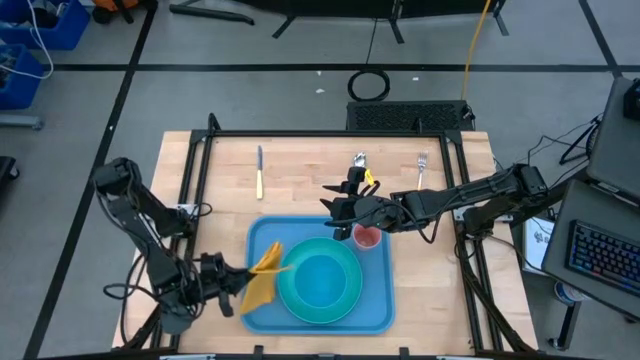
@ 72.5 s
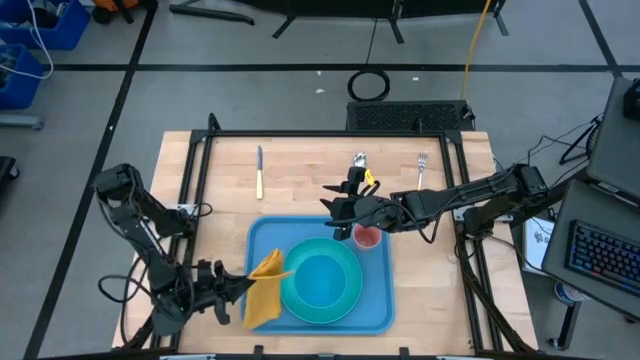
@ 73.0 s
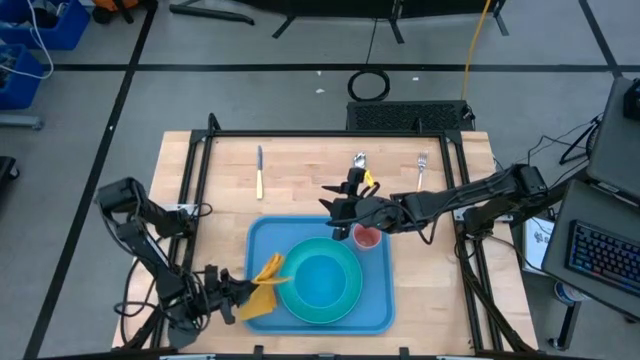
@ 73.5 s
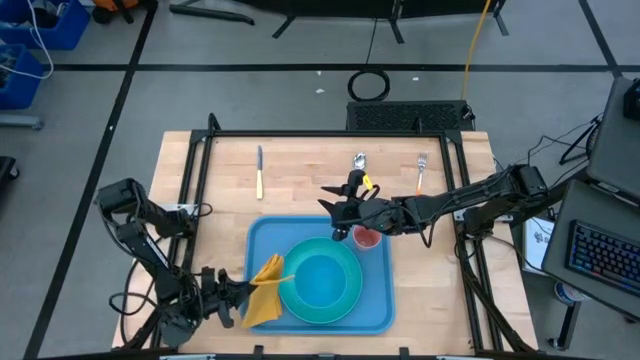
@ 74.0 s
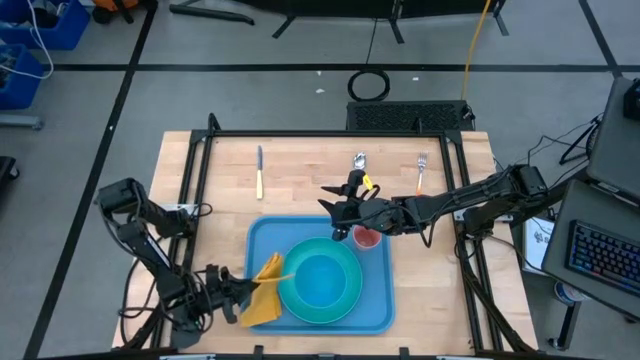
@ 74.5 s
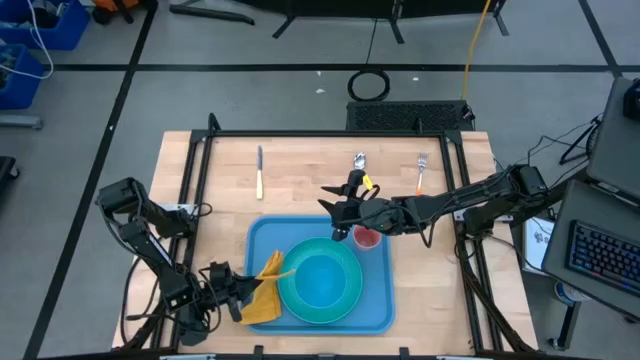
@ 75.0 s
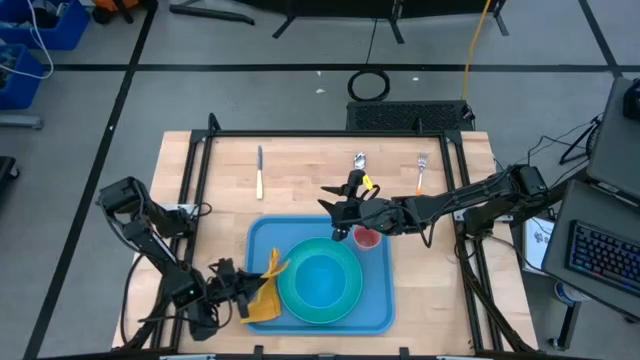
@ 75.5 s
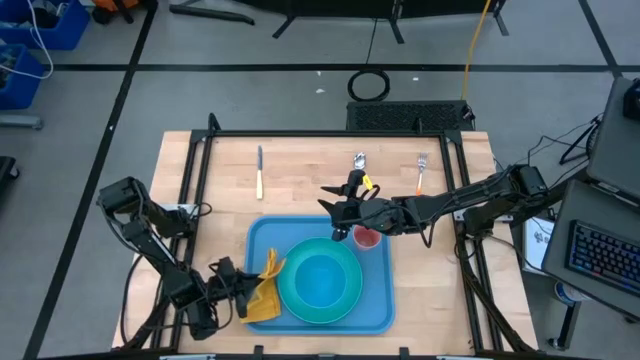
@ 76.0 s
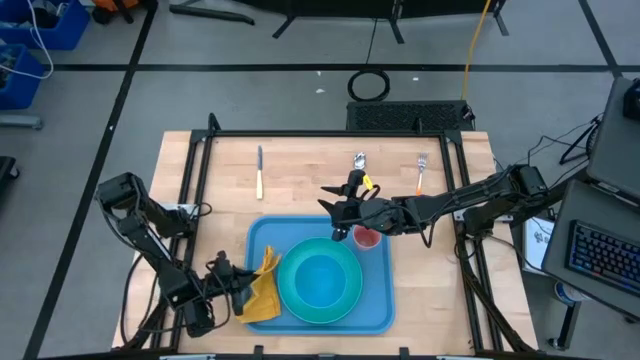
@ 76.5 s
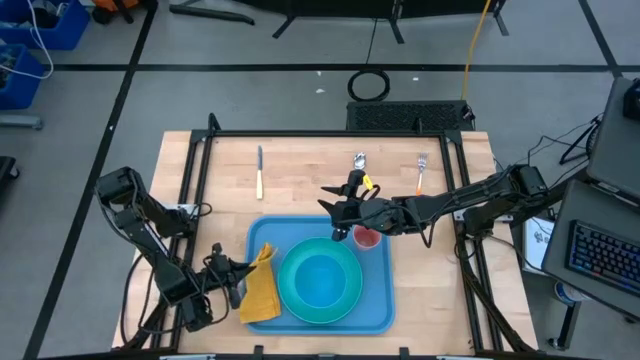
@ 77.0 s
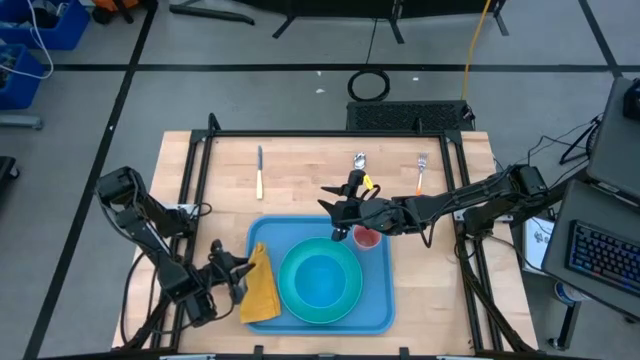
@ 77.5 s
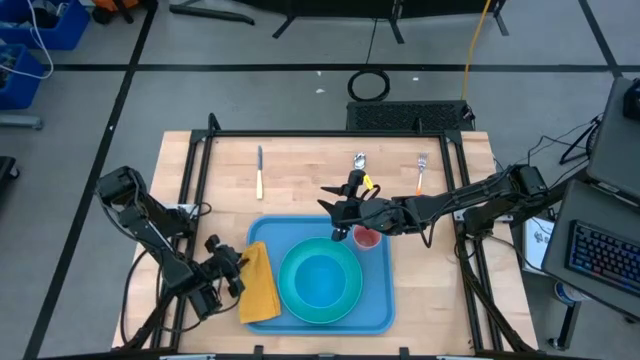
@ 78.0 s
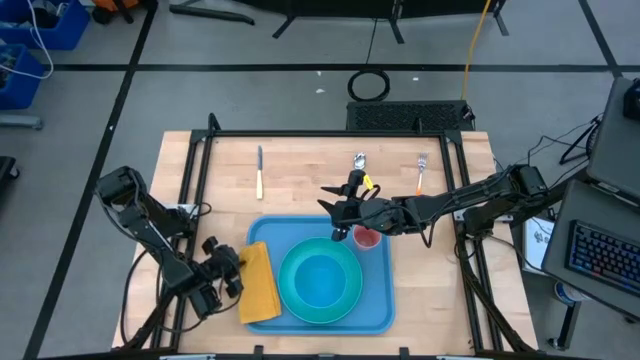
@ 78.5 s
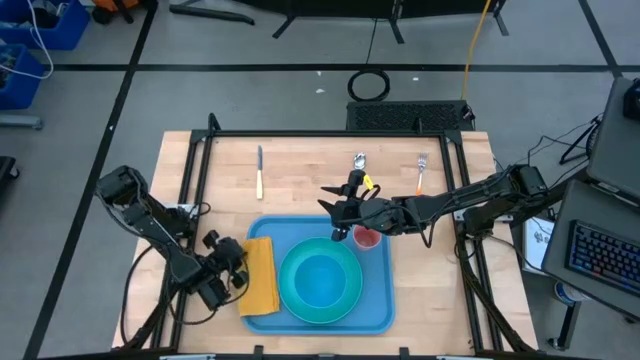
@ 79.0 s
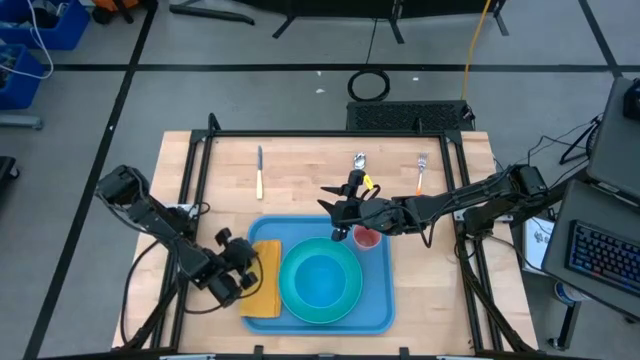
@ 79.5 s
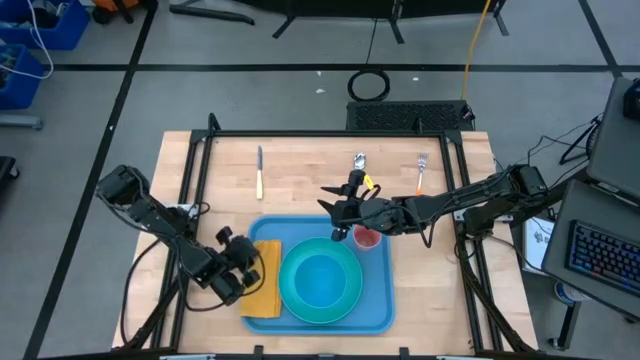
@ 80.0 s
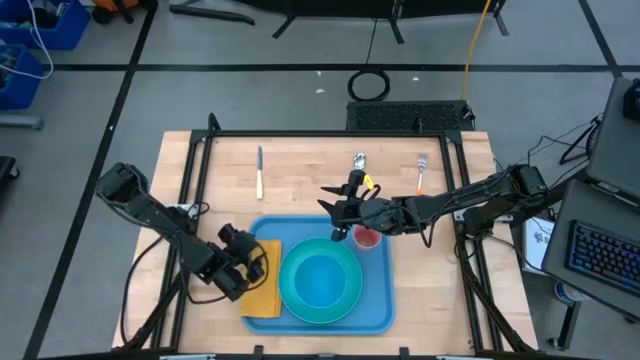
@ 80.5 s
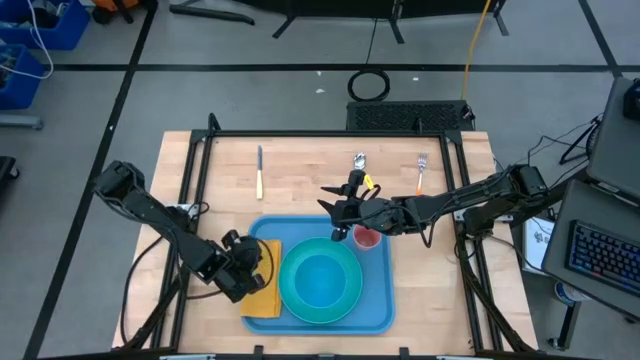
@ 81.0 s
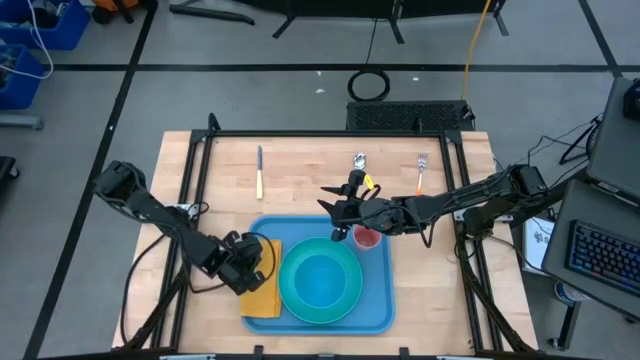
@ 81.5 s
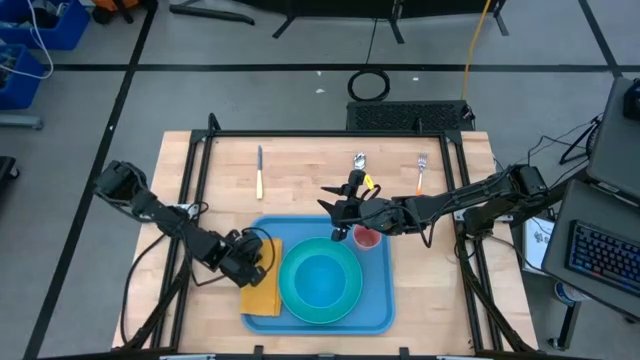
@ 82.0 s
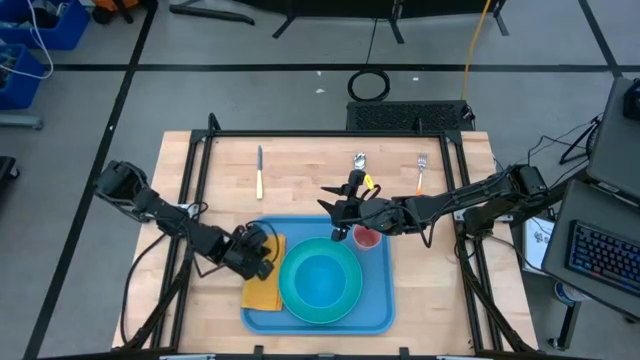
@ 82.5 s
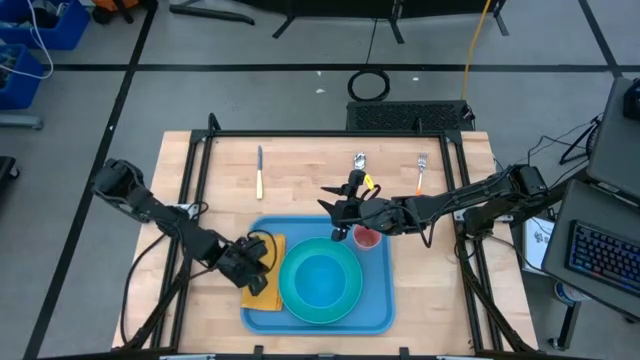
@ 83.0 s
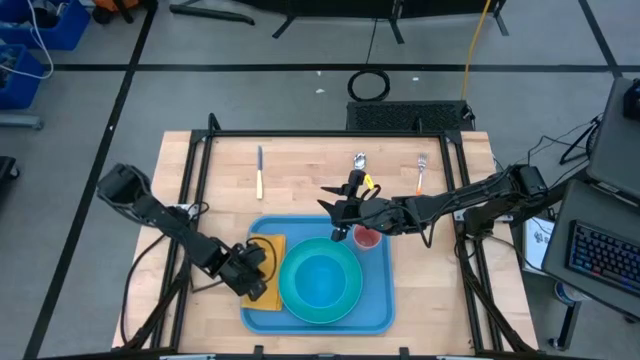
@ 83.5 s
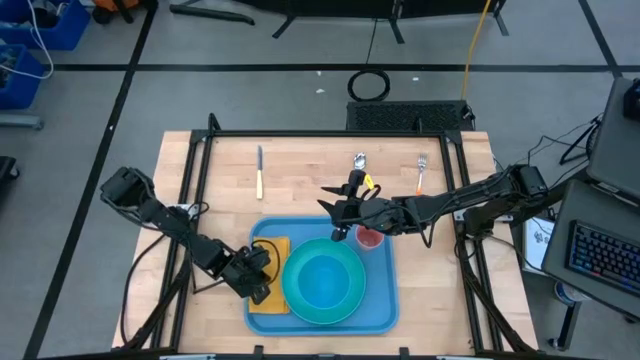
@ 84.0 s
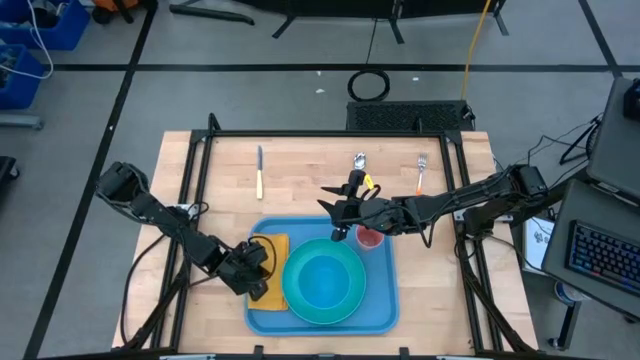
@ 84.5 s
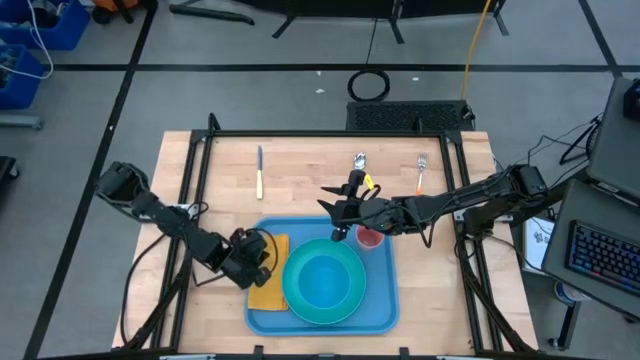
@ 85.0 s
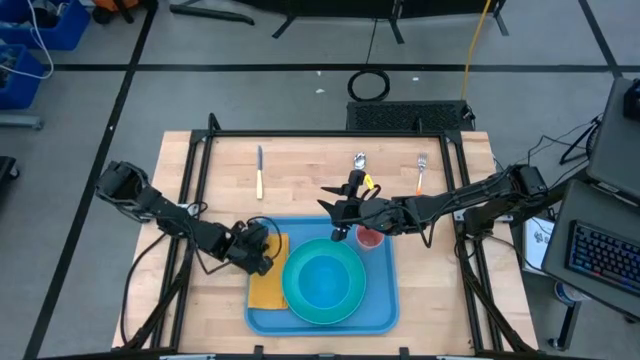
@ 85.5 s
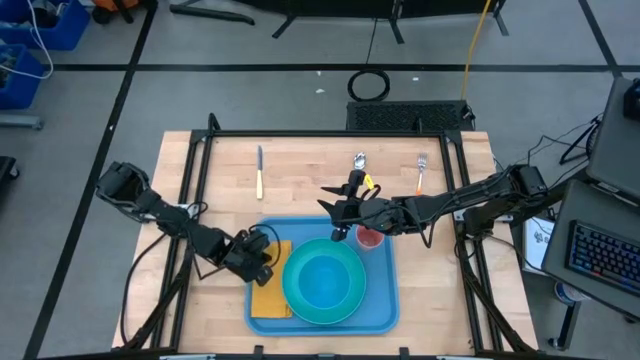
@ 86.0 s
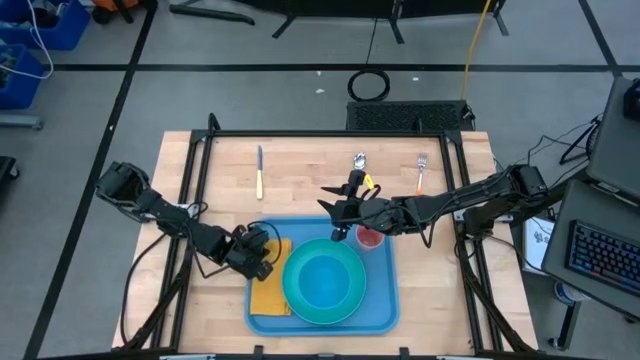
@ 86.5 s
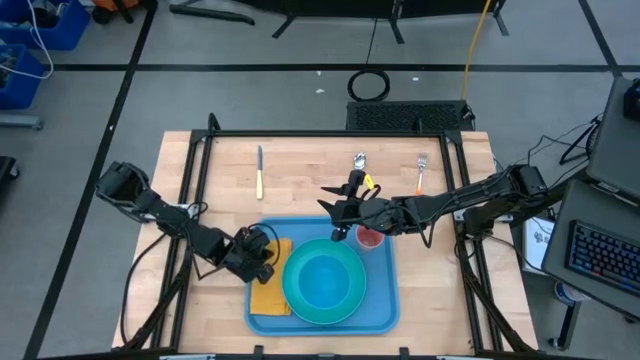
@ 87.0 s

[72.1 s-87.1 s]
Task: Set up tray
Put the yellow napkin on the blue tray at the left of the light blue plate

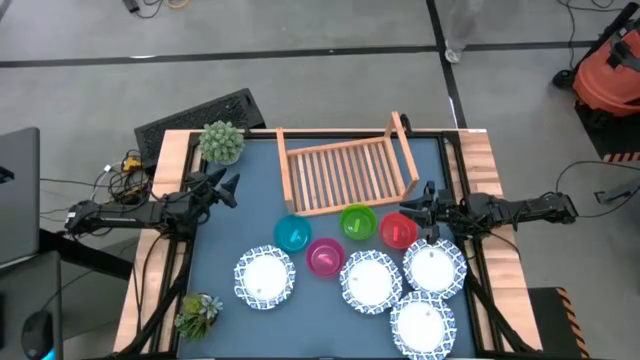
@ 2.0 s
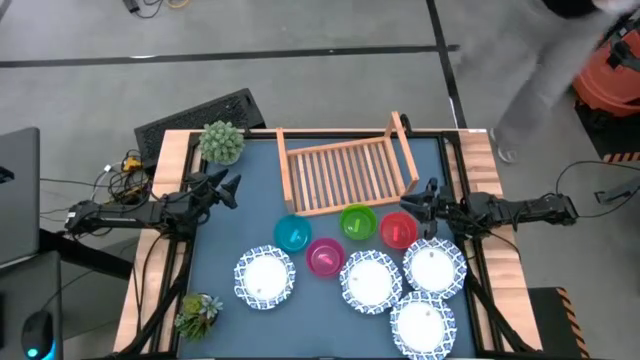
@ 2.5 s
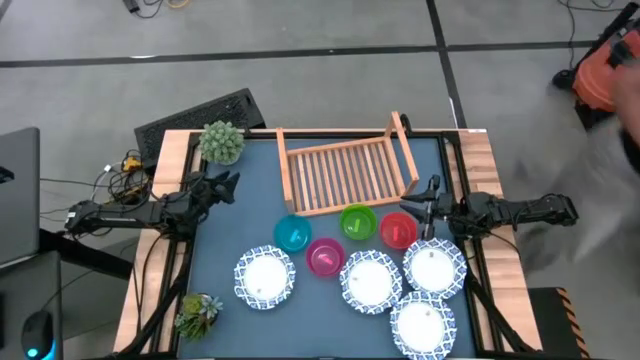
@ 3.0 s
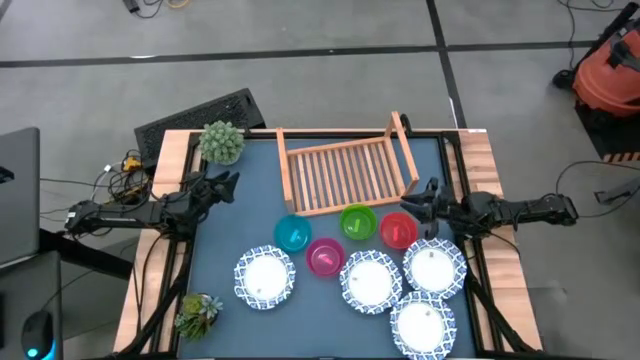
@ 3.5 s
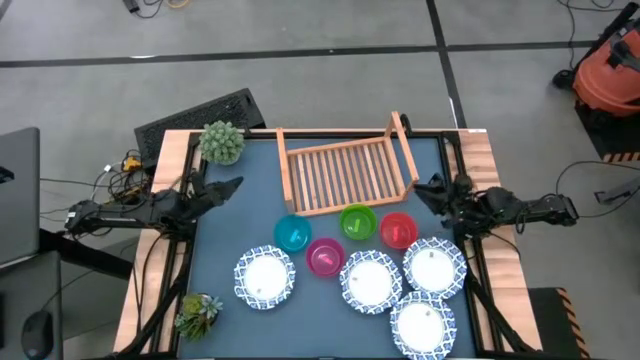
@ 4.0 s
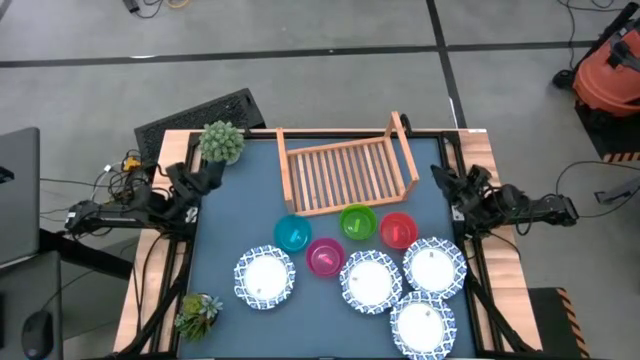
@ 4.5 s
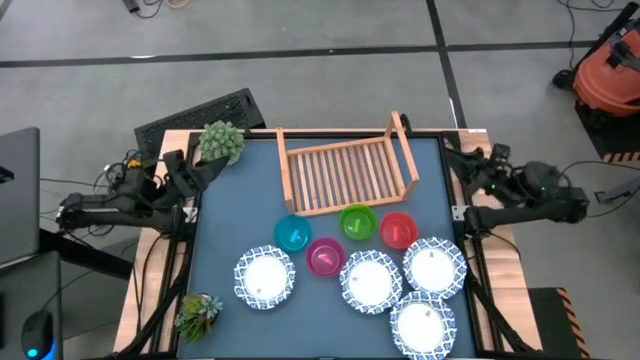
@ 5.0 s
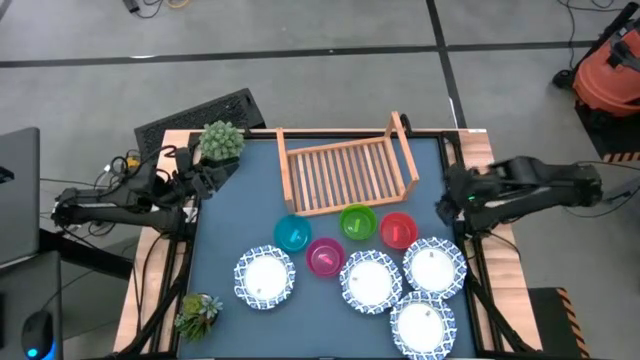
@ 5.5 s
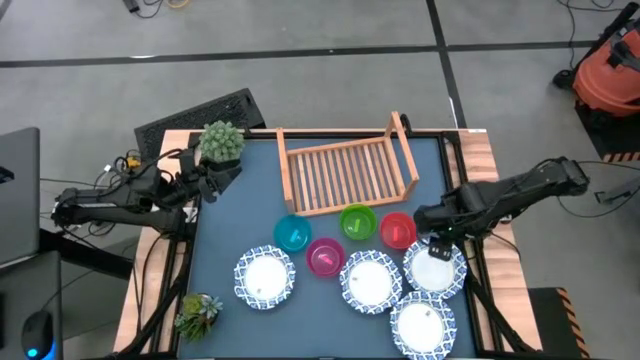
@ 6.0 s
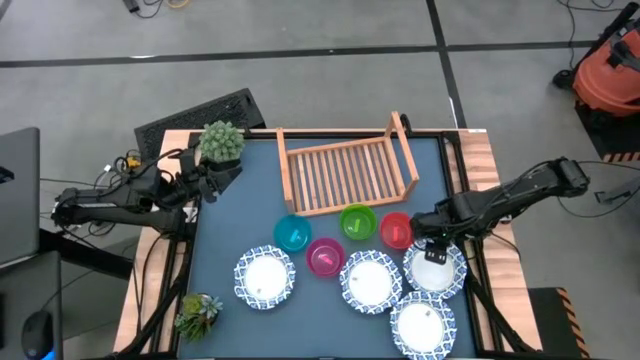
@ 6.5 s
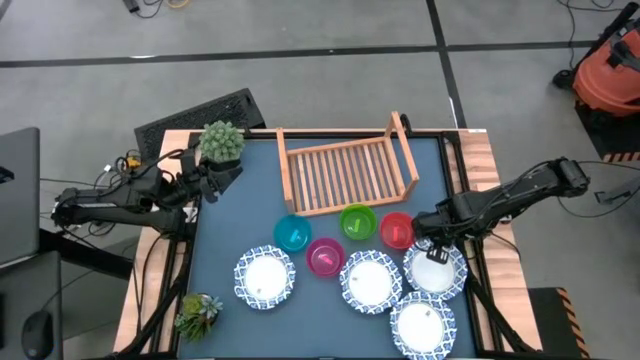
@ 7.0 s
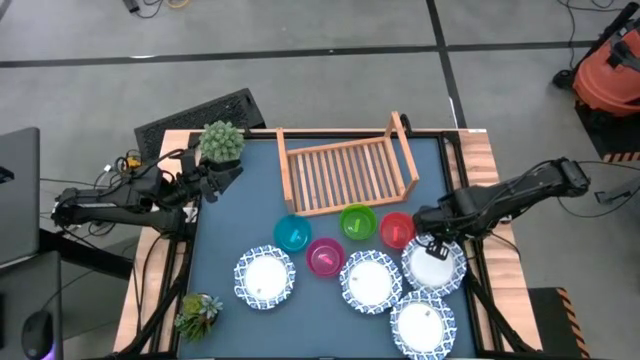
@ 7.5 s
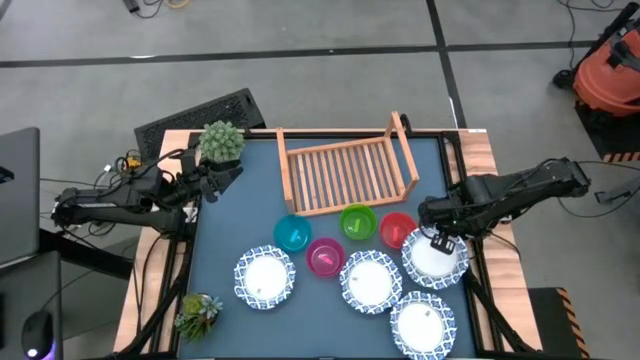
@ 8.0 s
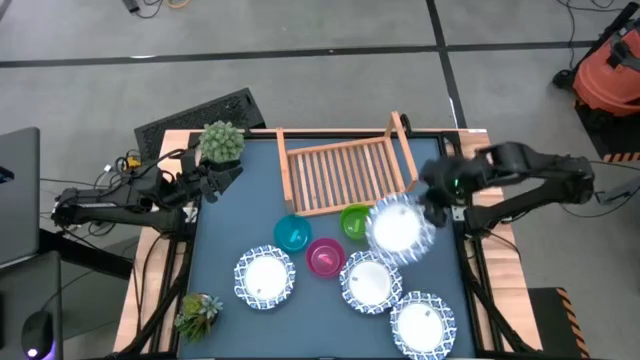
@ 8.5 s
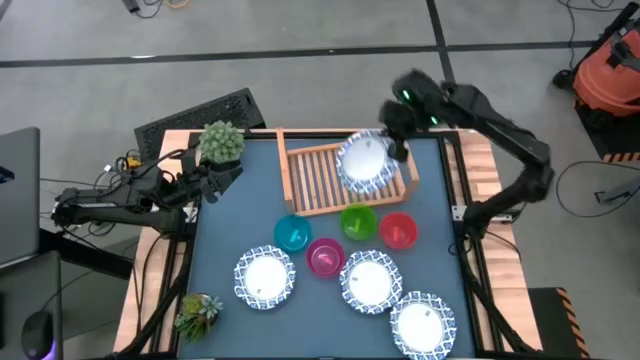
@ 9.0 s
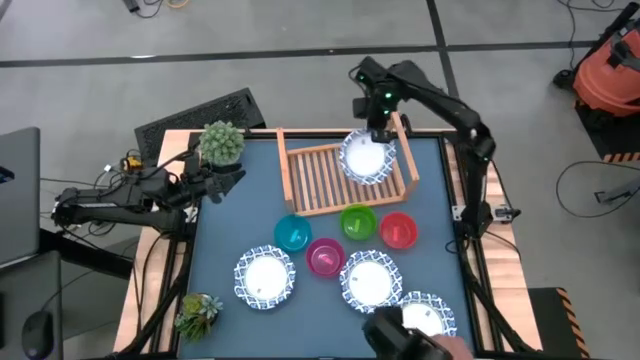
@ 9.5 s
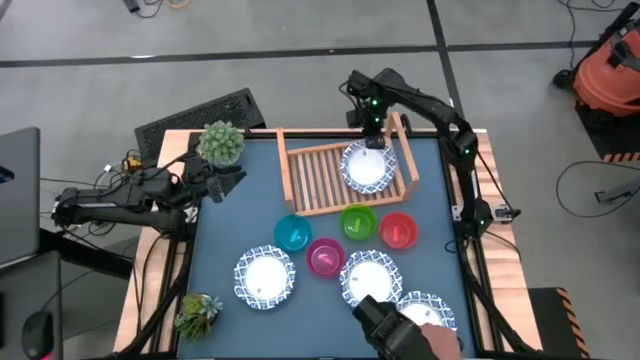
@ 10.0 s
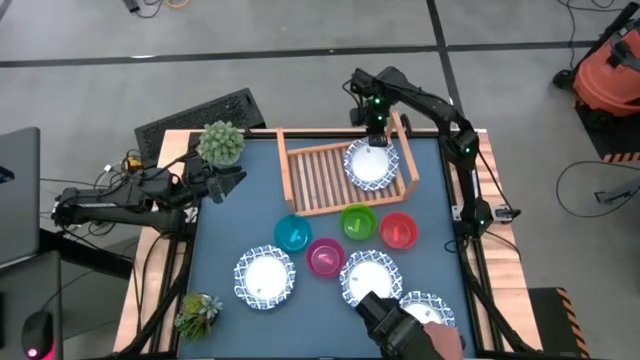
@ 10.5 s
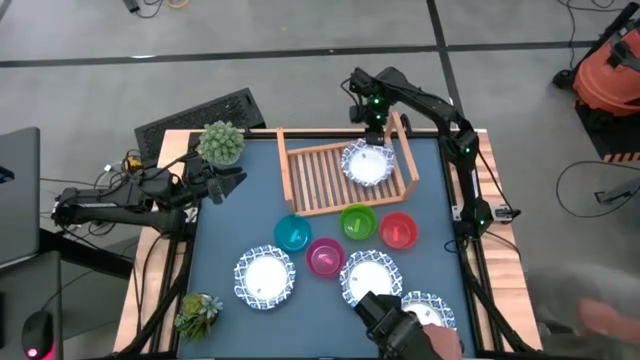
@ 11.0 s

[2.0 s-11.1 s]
Task: Place and stack bowls onto a shelf
Put the white bowl on the shelf
